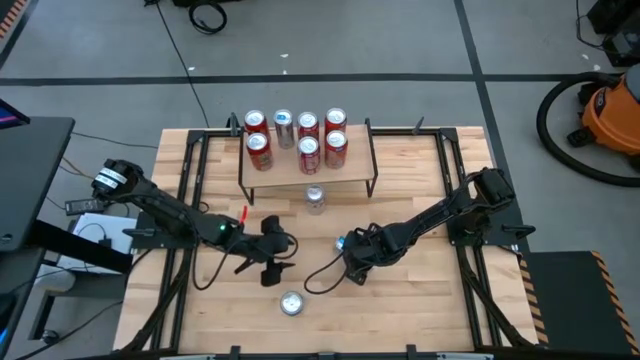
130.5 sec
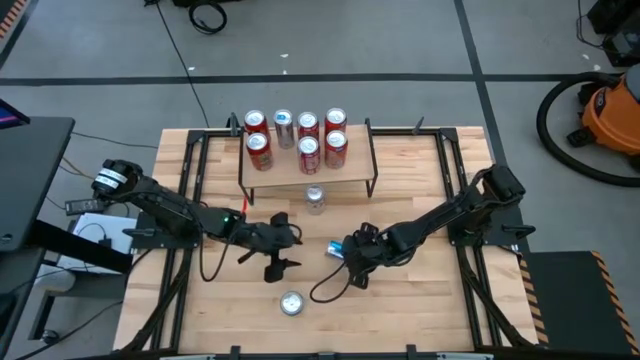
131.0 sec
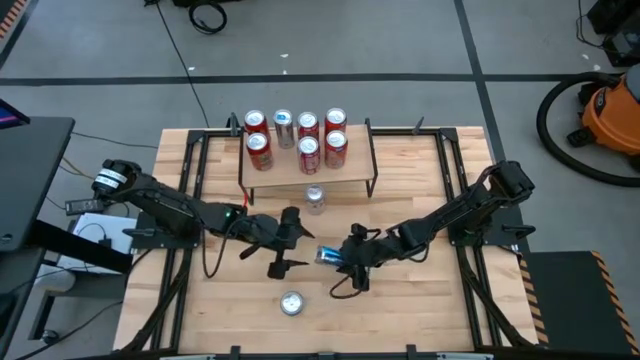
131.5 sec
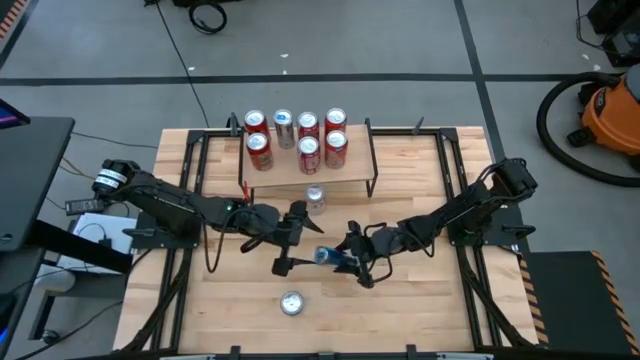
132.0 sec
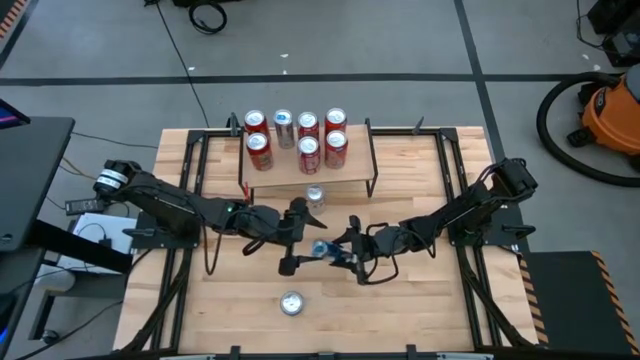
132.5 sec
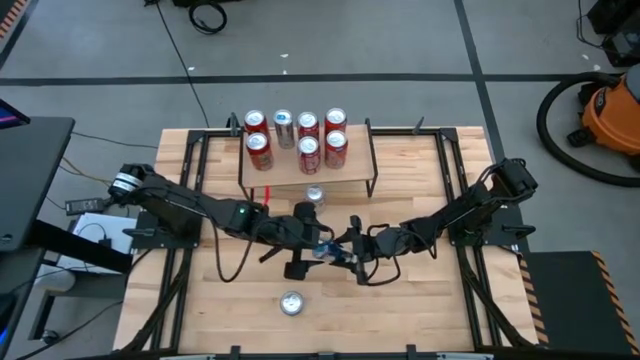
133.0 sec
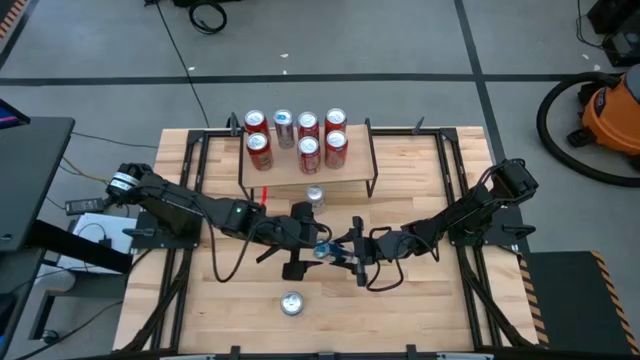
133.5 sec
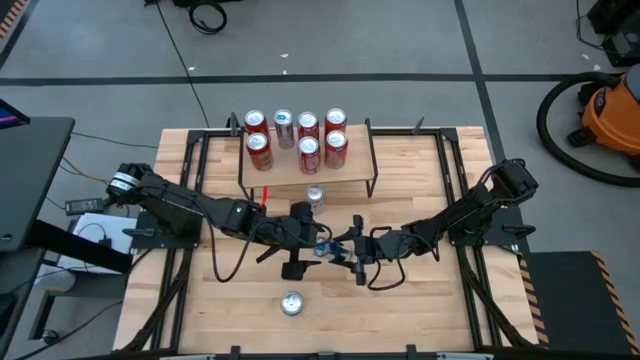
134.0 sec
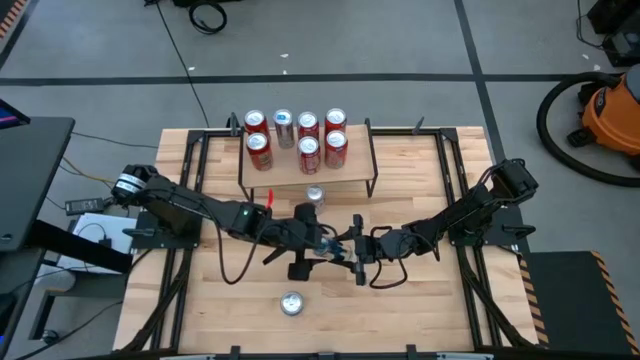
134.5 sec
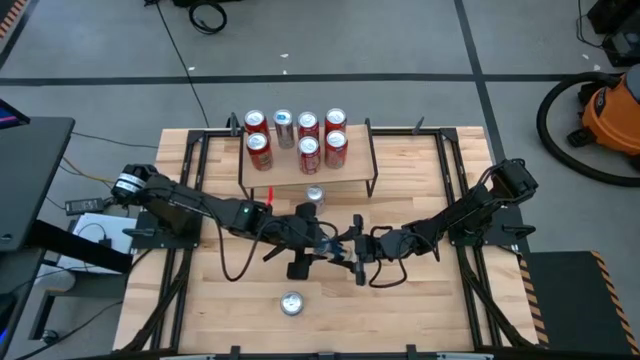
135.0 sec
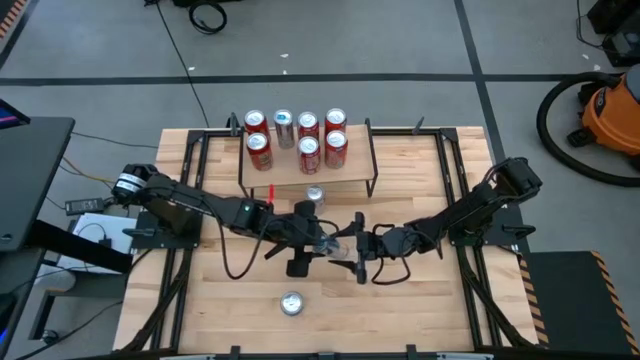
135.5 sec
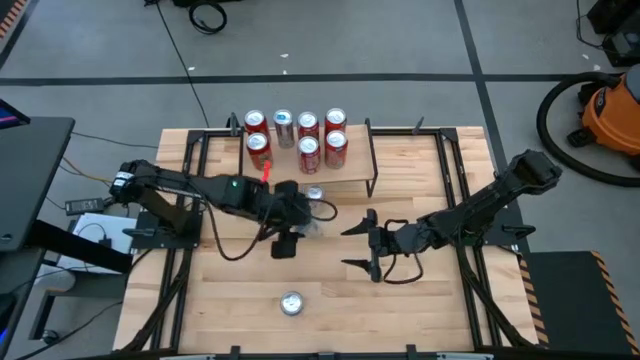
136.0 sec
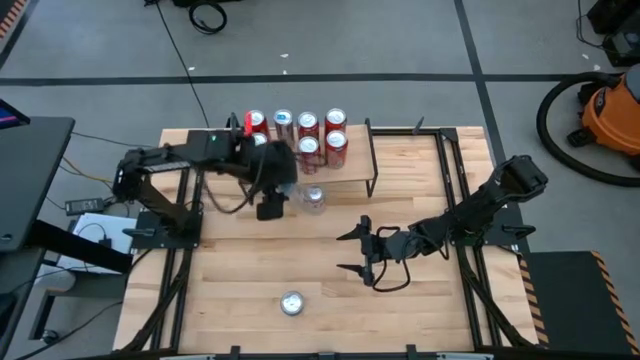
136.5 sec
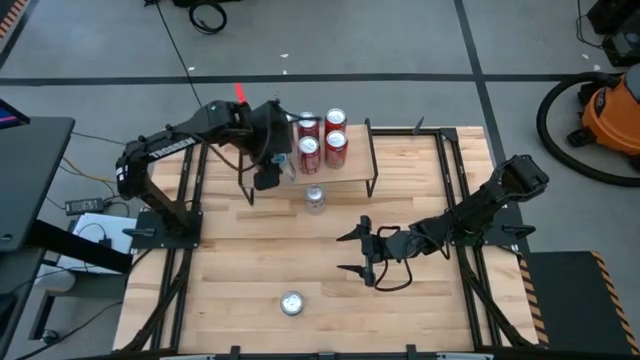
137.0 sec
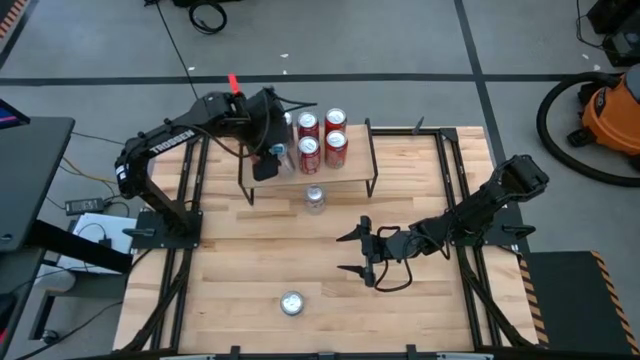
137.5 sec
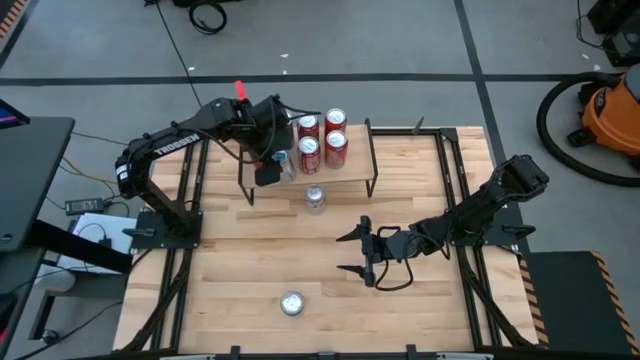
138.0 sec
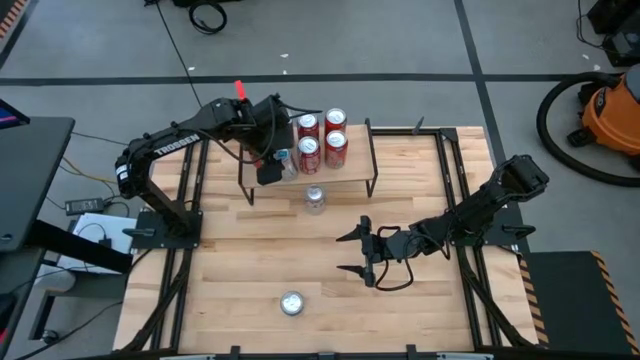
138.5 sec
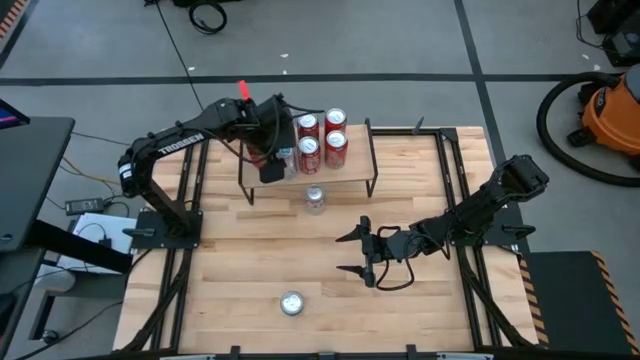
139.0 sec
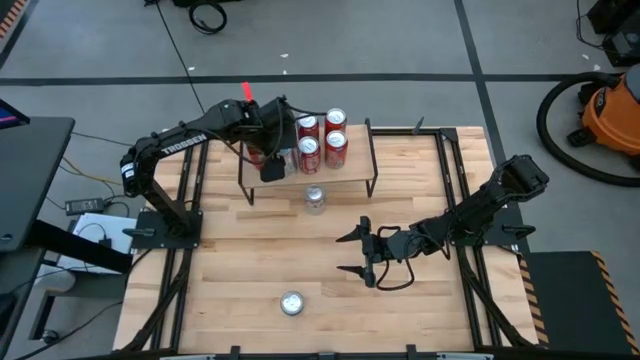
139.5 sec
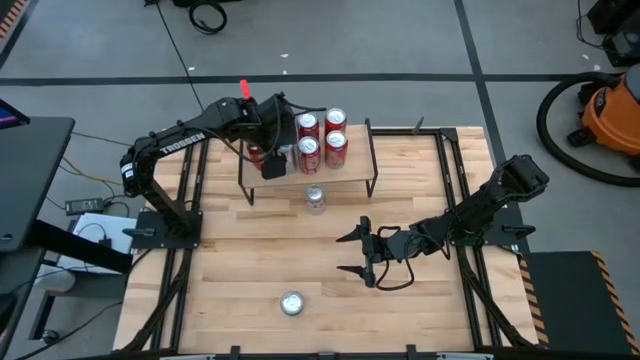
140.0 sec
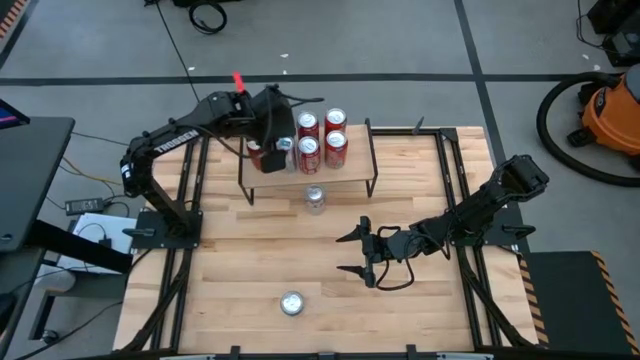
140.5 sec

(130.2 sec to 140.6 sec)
Task: Place canned beverage on shelf
Put the blue soda can on the shelf

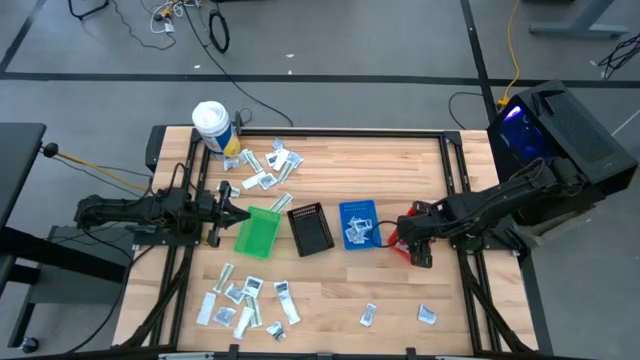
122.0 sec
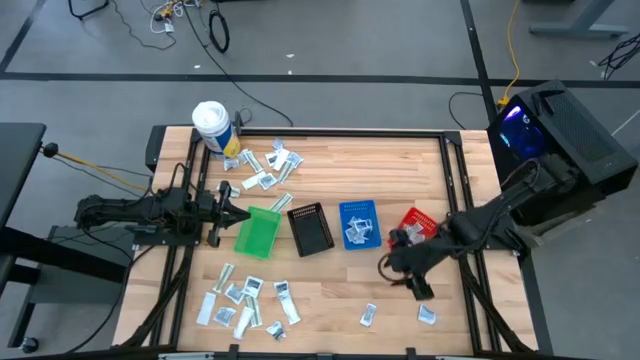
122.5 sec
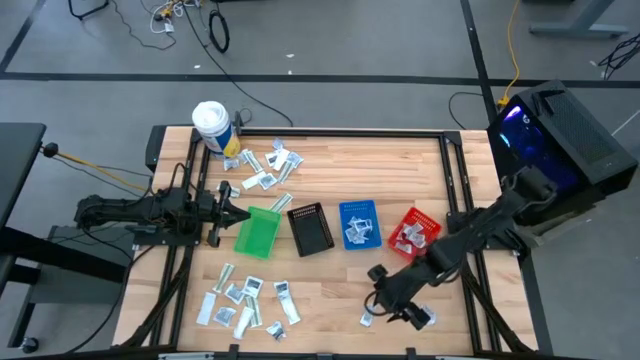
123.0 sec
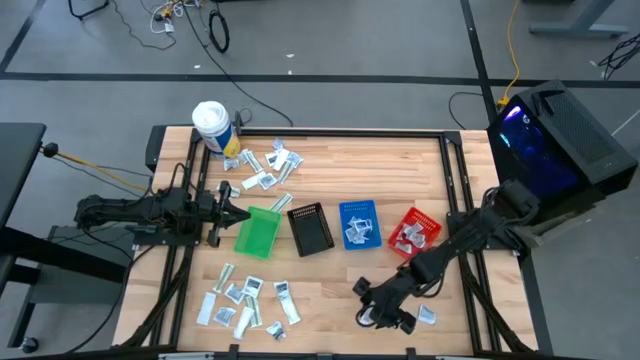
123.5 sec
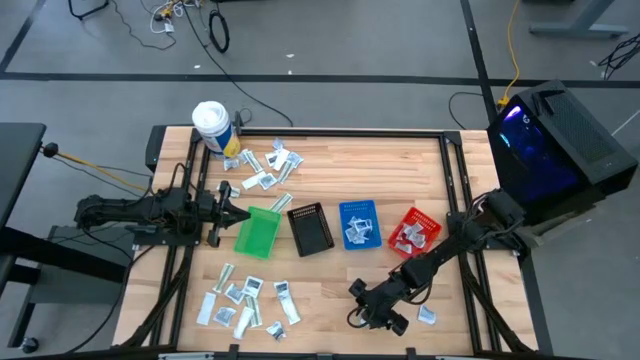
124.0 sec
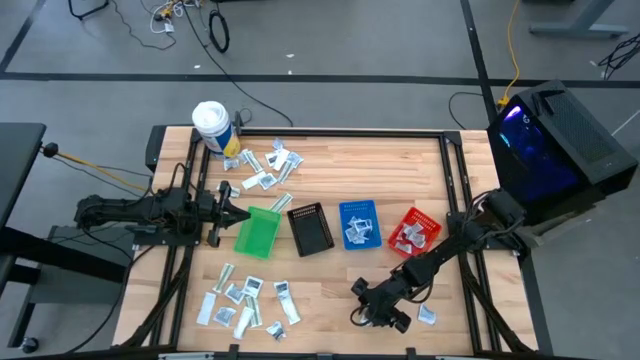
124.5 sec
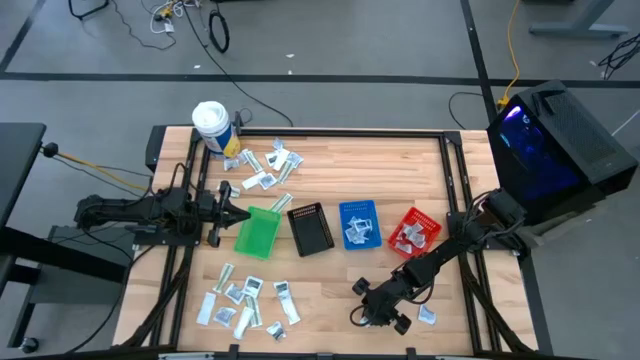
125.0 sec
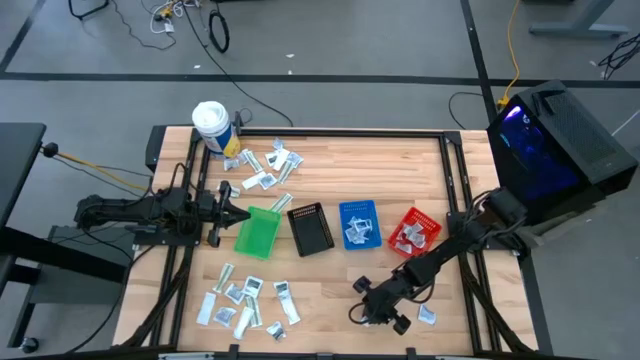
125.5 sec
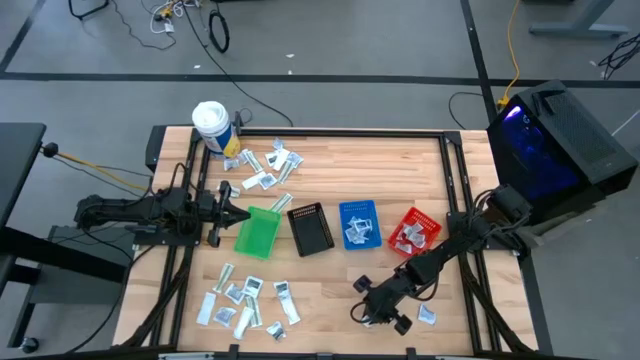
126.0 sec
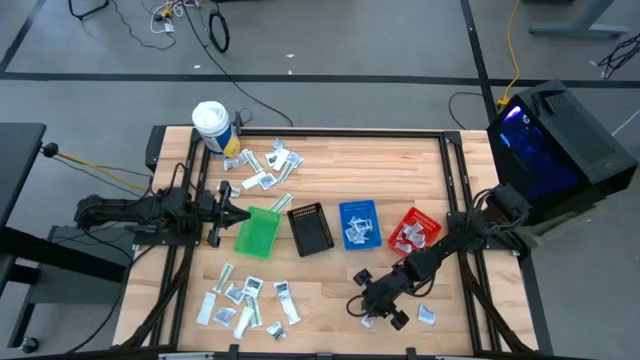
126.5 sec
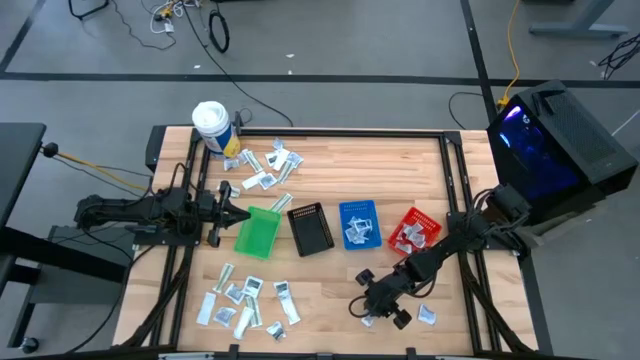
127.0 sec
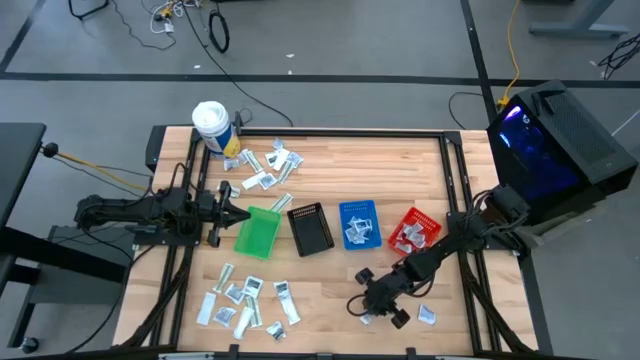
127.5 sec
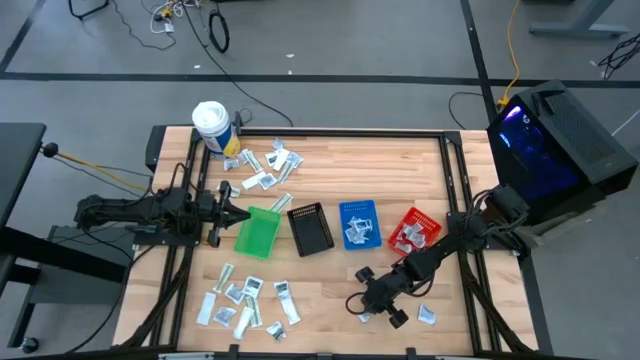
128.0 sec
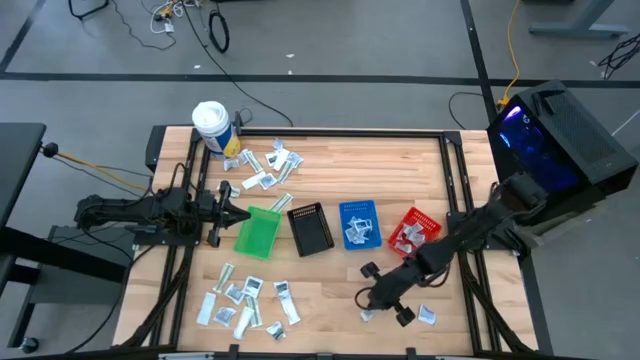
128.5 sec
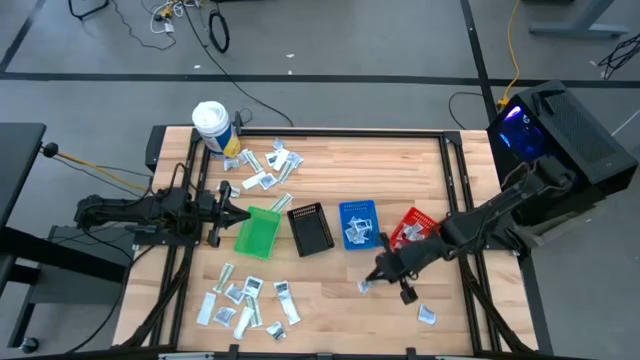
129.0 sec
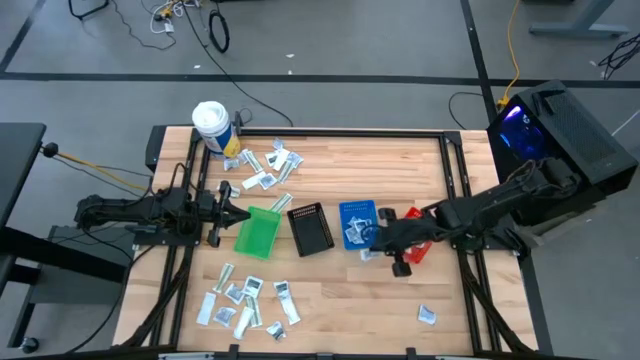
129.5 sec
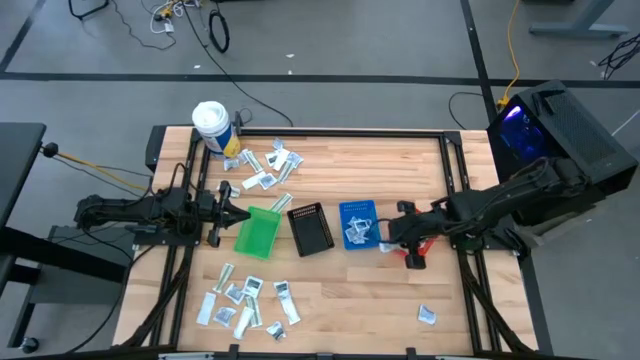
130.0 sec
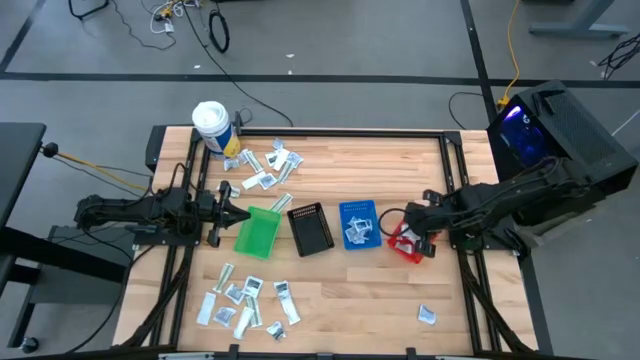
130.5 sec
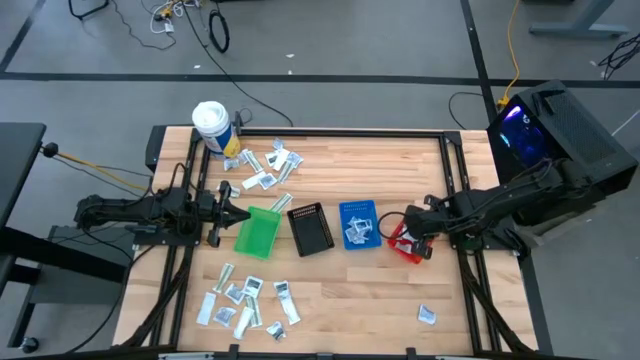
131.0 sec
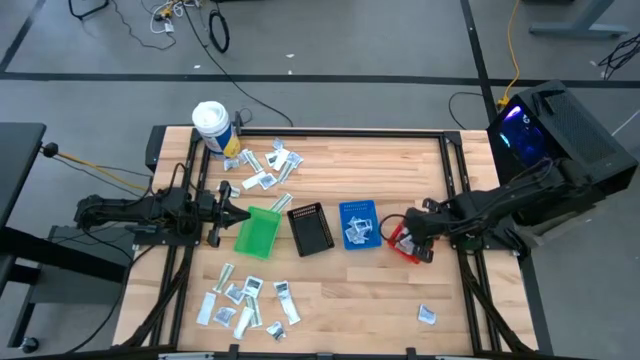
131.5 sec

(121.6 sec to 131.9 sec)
Task: Pick & Place First Aid Supplies
Put the ointment pack into the red basket
